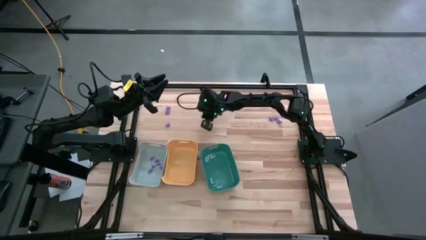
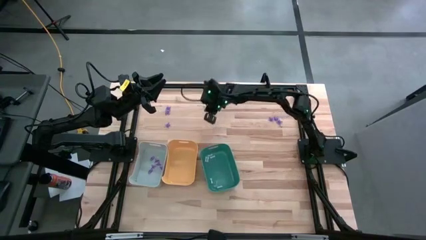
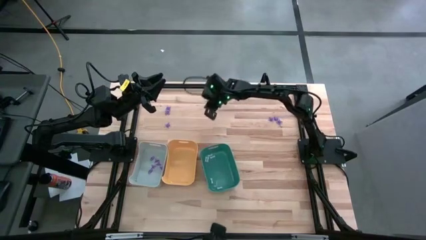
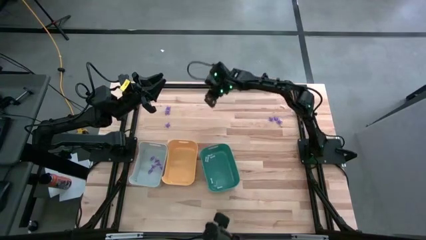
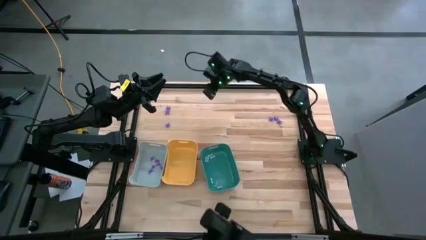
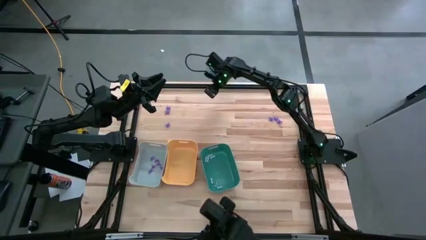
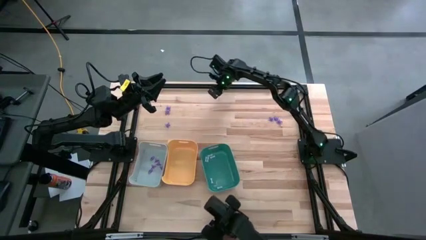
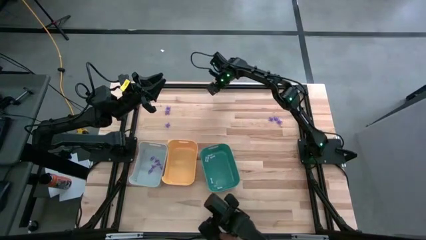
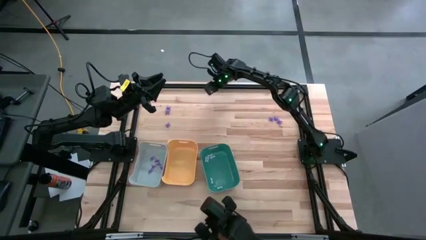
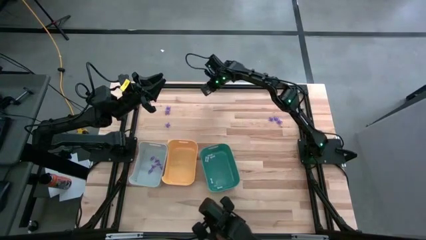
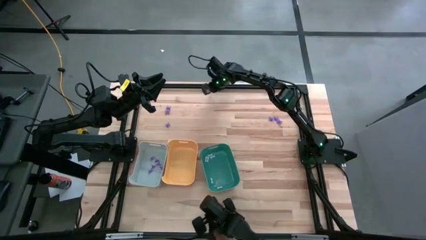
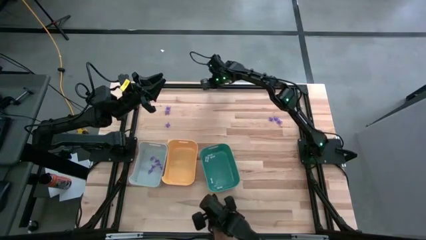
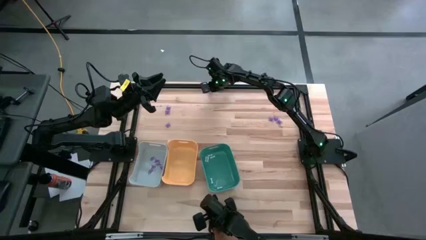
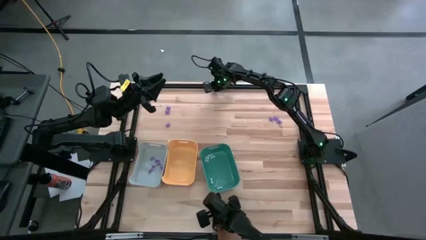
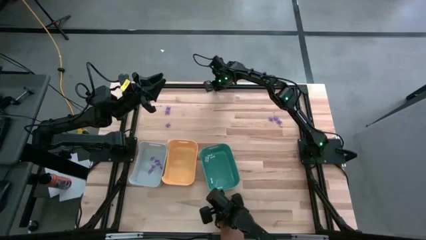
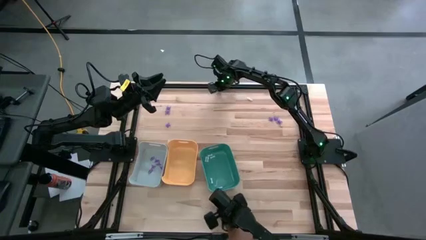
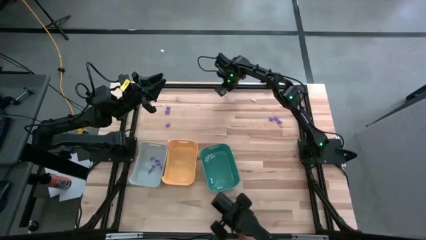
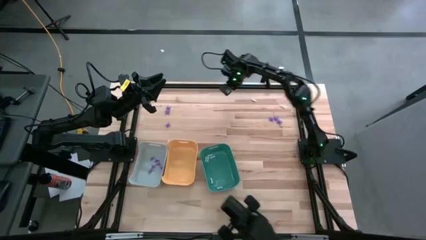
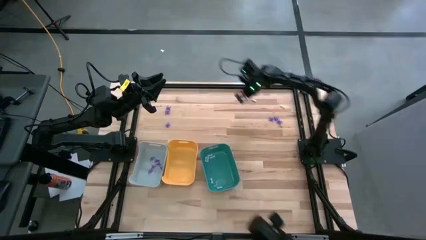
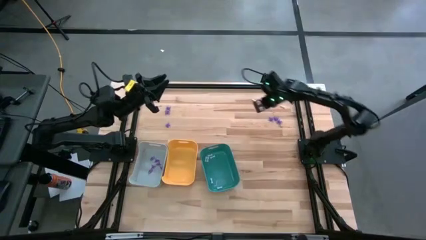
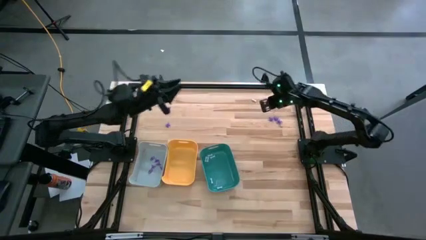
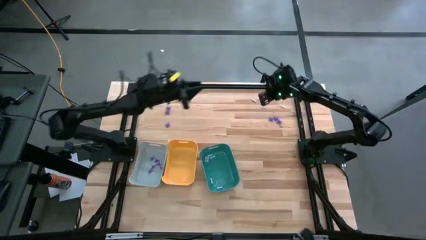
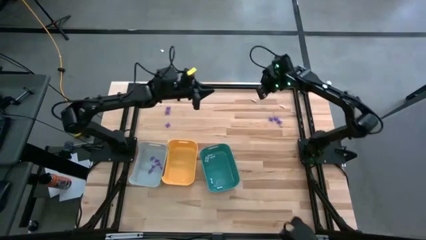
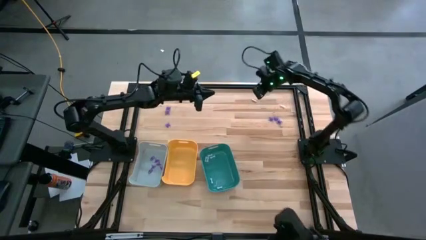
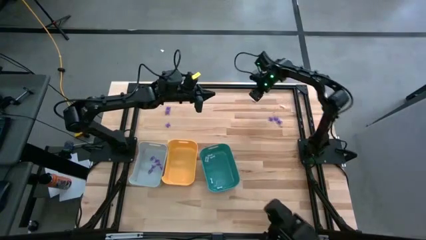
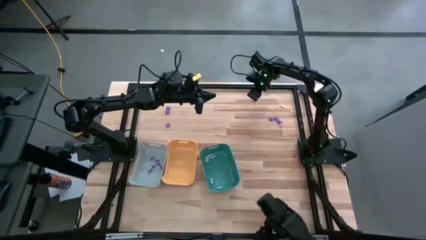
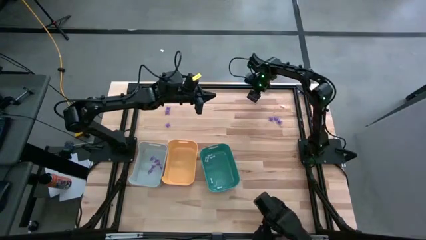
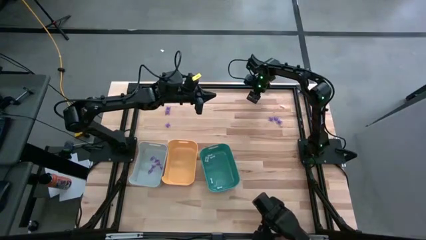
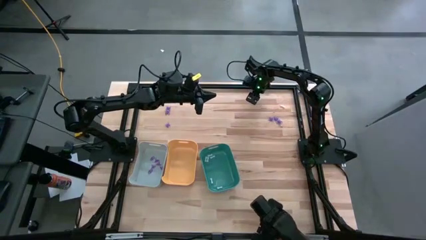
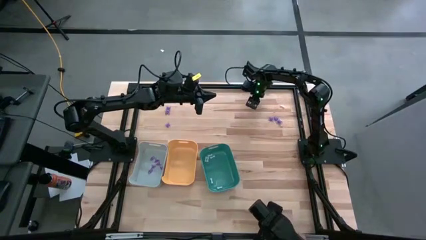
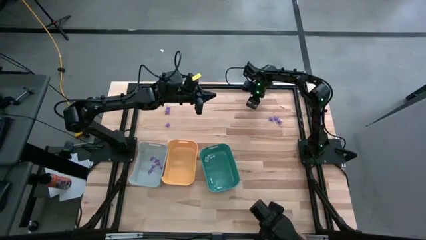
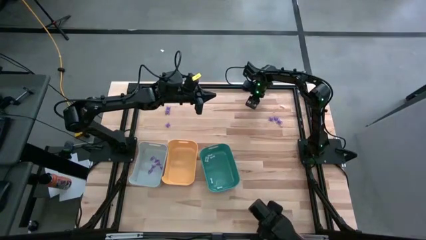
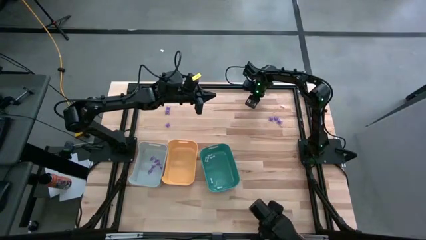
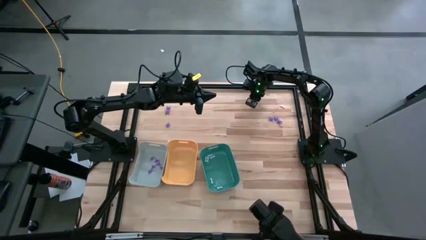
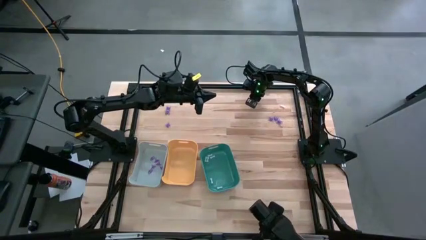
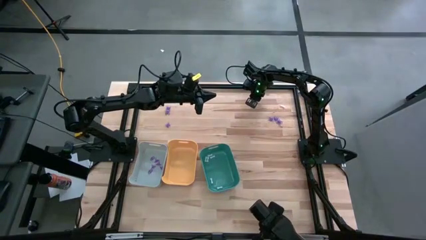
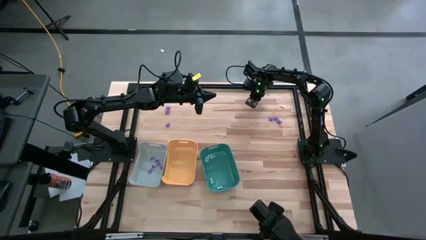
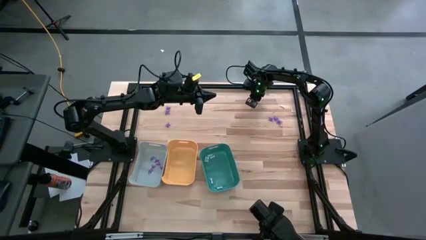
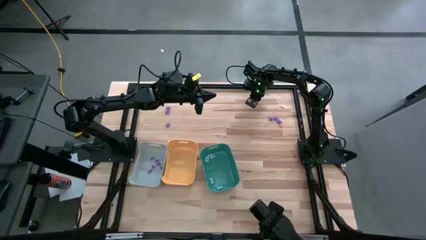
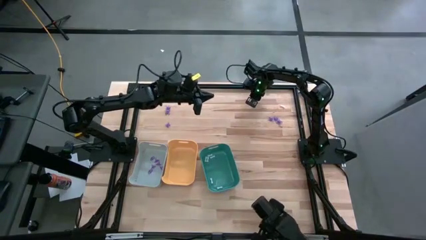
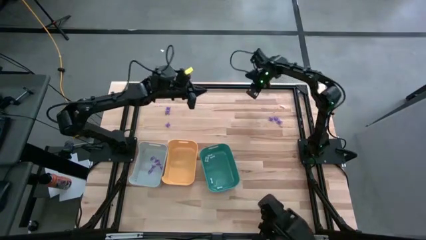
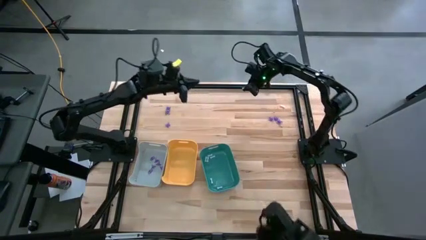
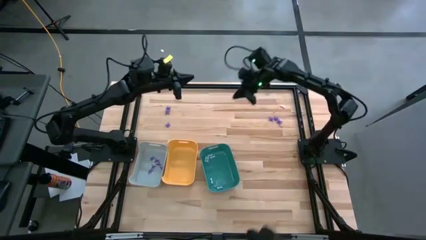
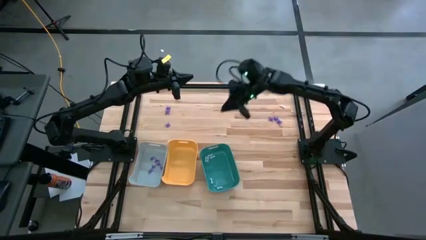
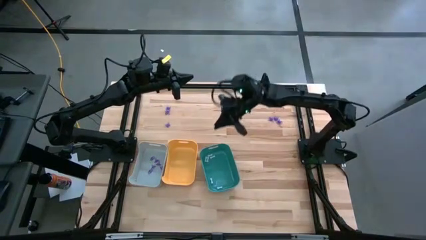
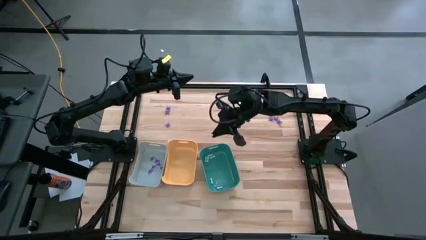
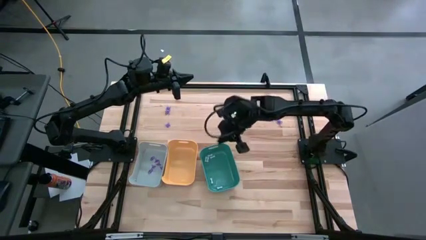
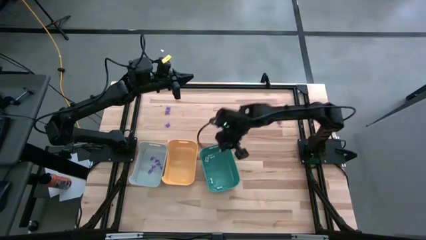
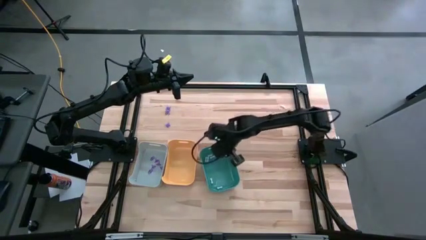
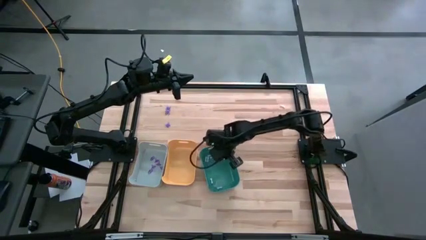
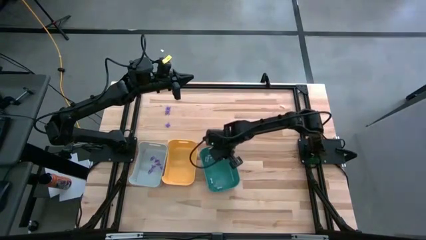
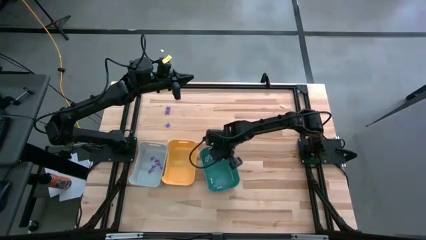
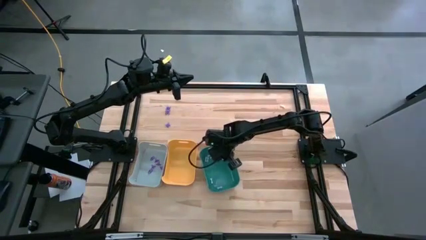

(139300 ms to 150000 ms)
Task: Sort Halloween decoration
Put the white bone toy into the green bin

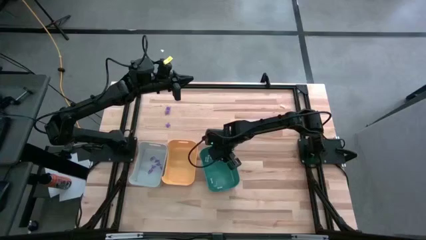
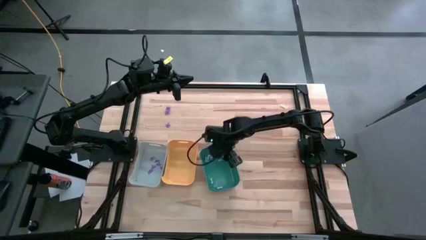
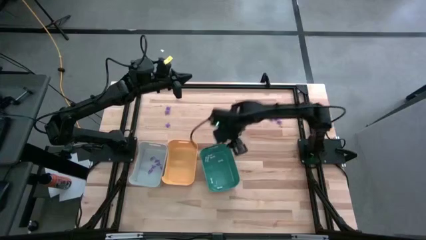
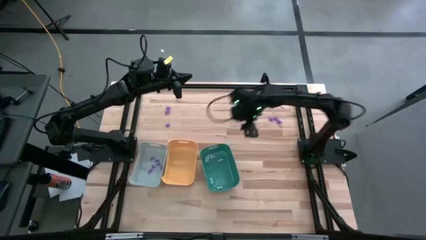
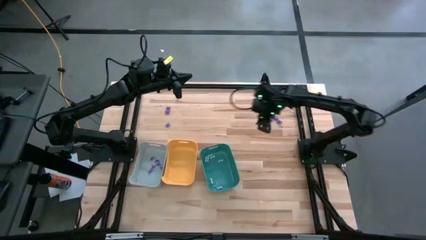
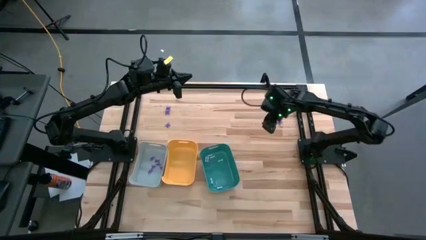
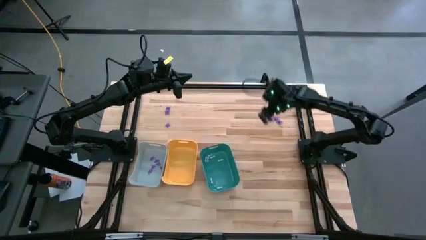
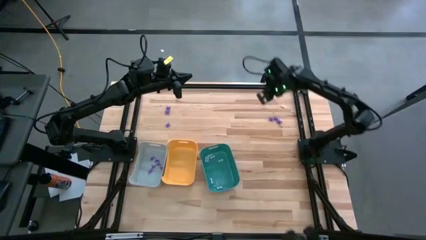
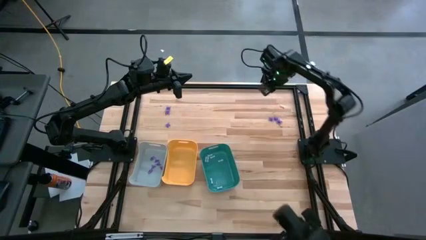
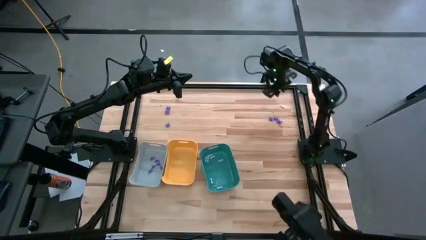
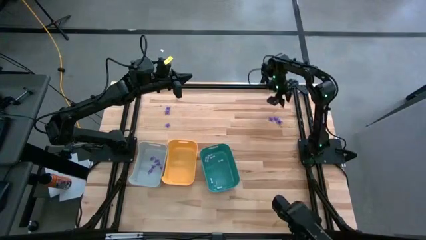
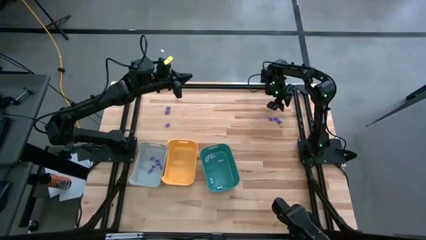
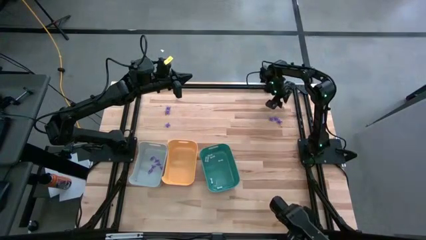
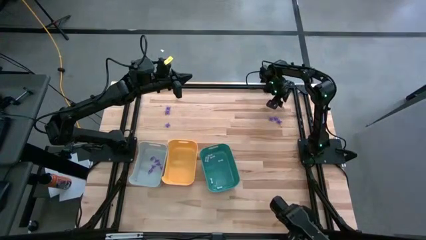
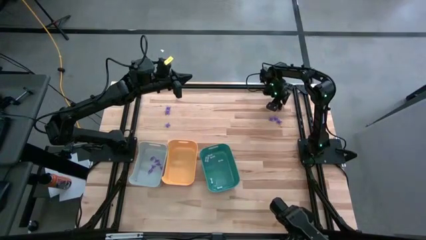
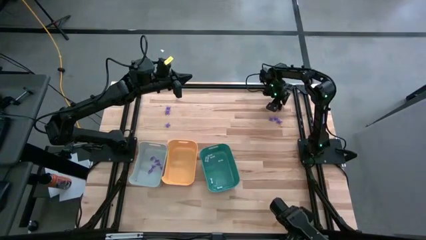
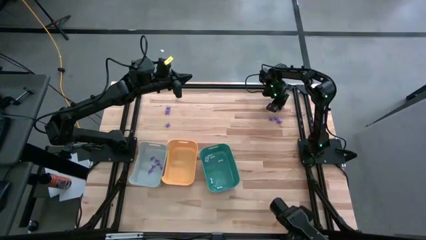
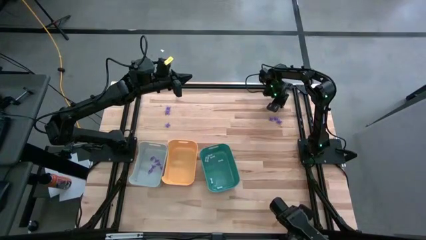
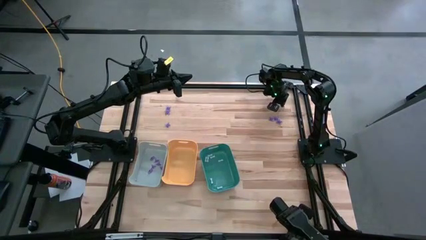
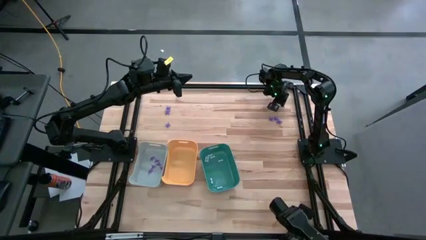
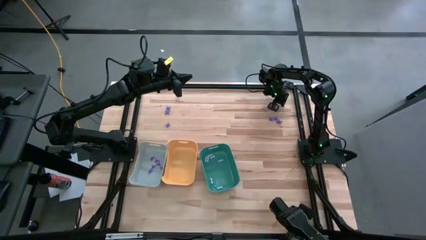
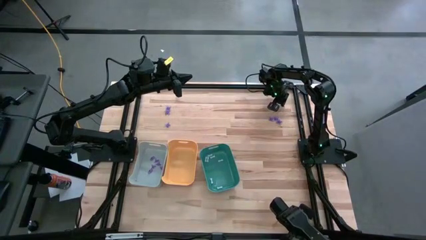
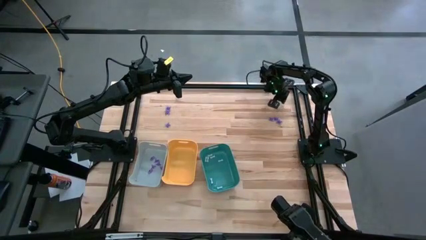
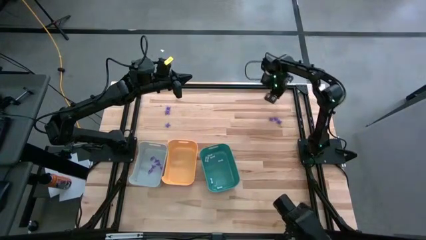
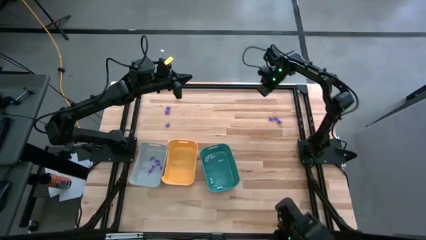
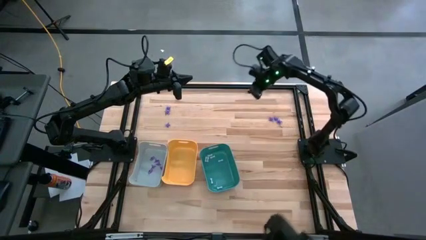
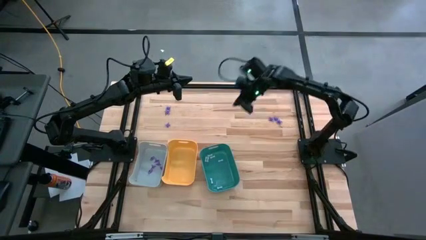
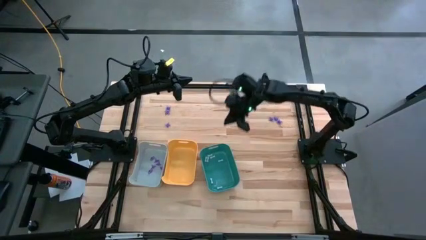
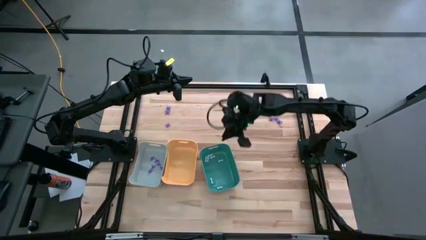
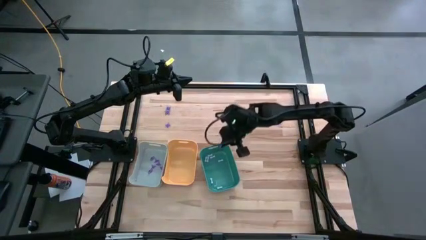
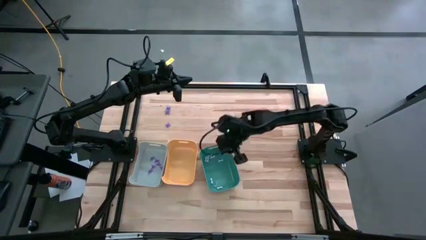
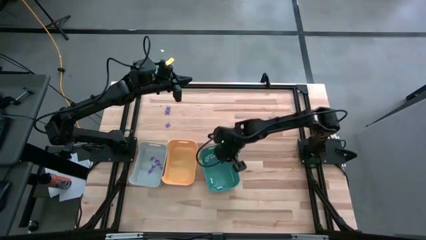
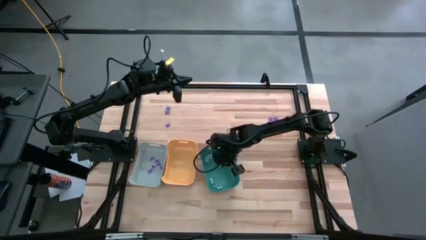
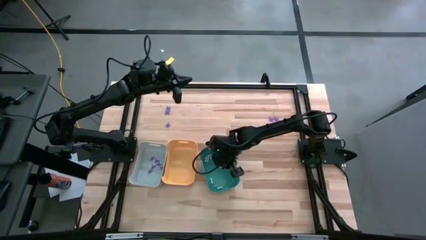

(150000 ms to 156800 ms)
Put the white bone toy into the green bin
